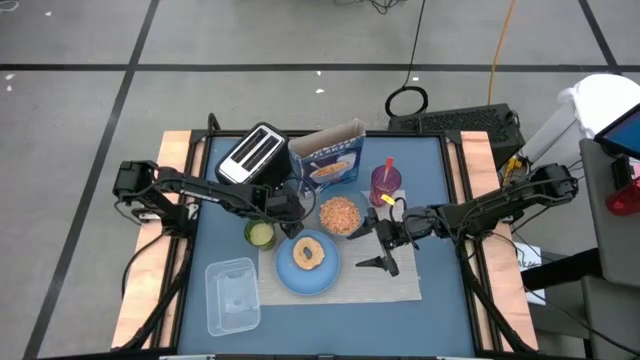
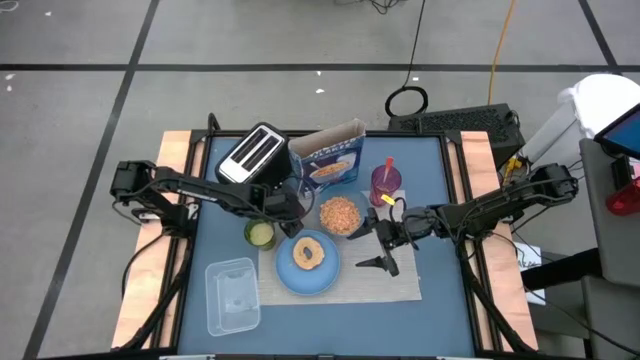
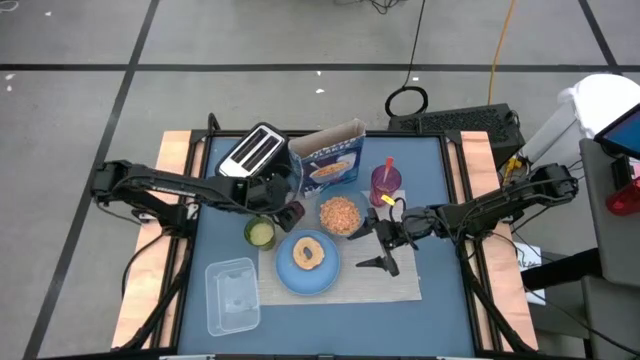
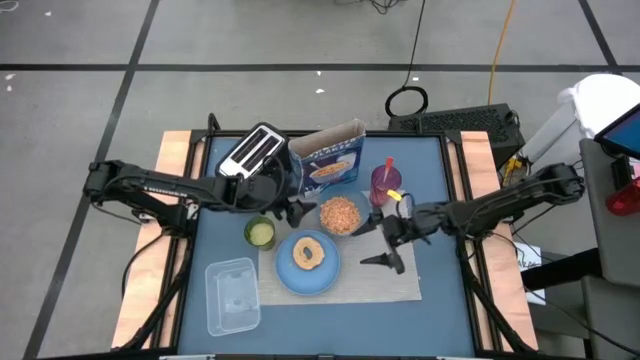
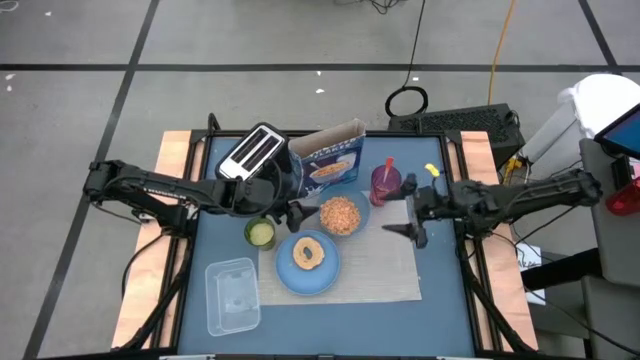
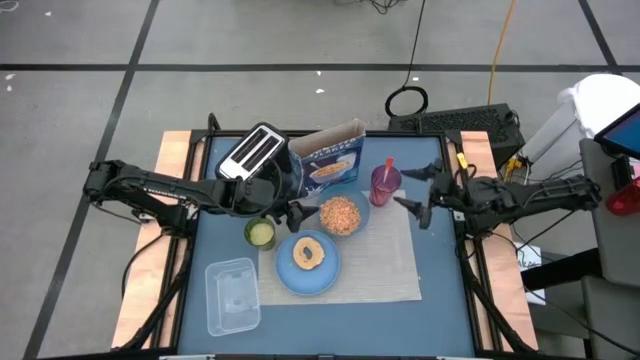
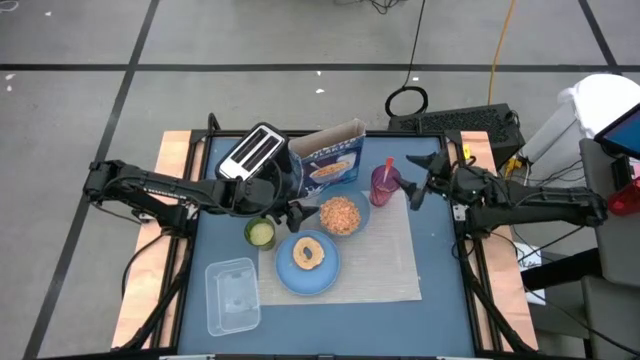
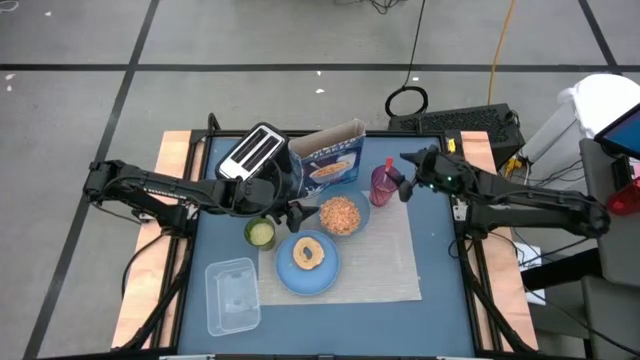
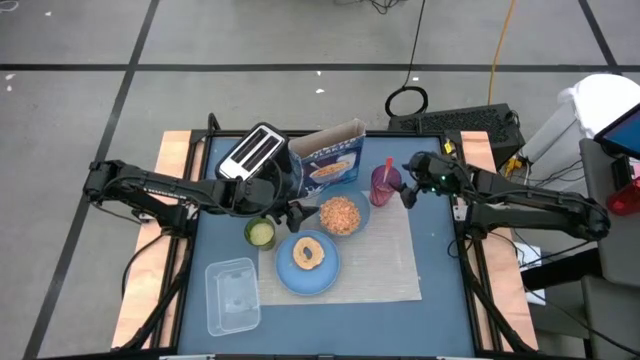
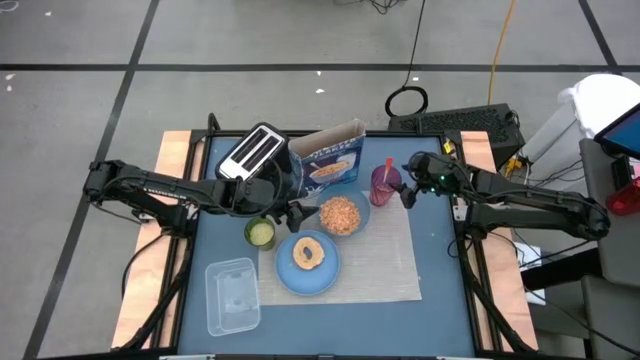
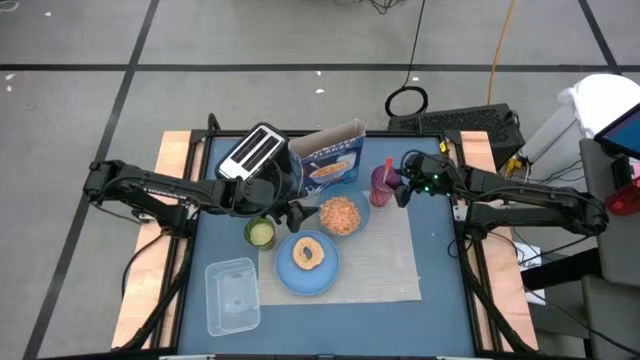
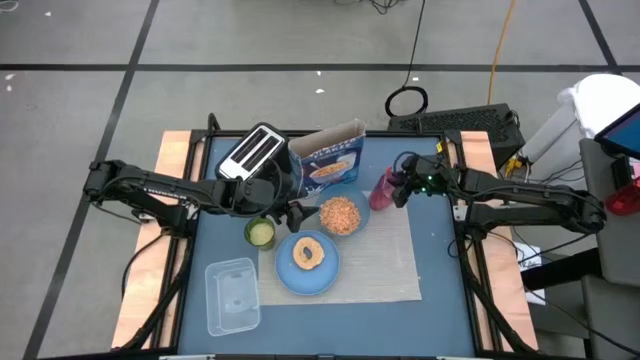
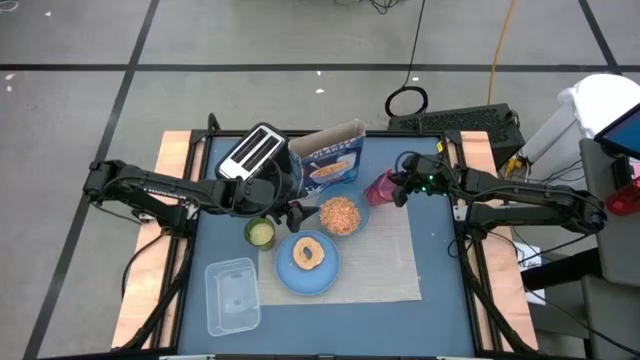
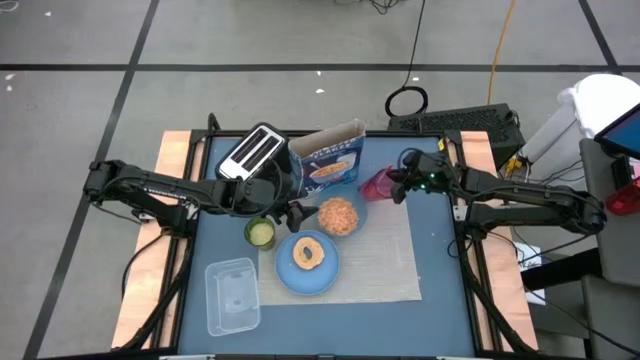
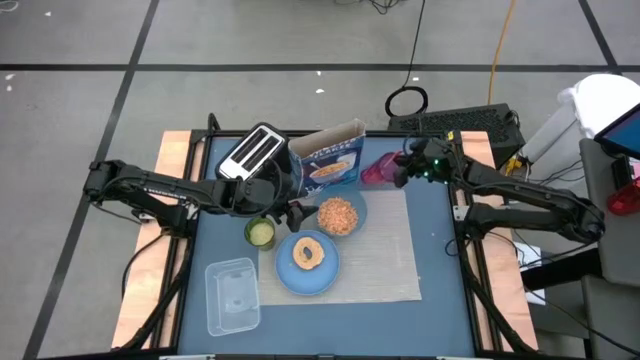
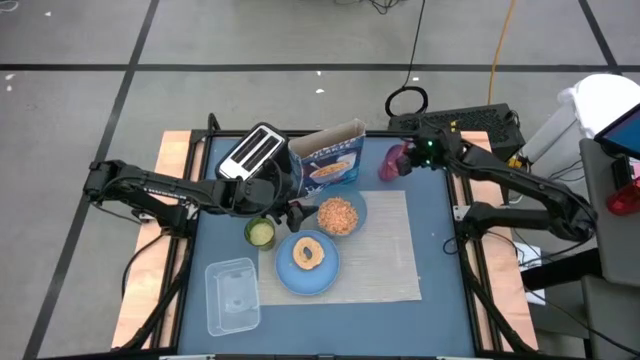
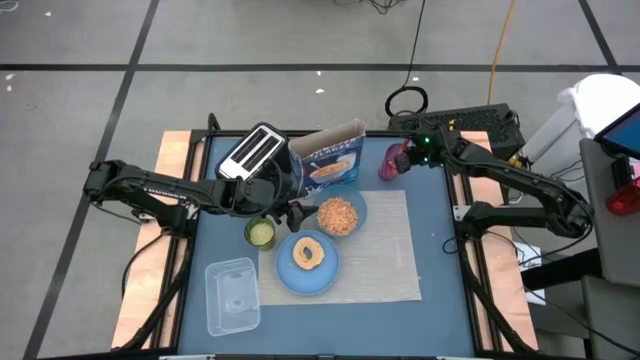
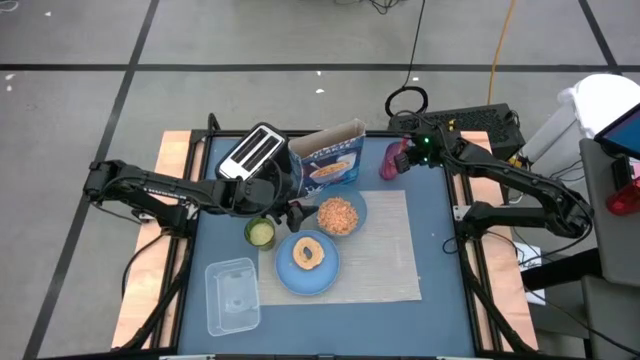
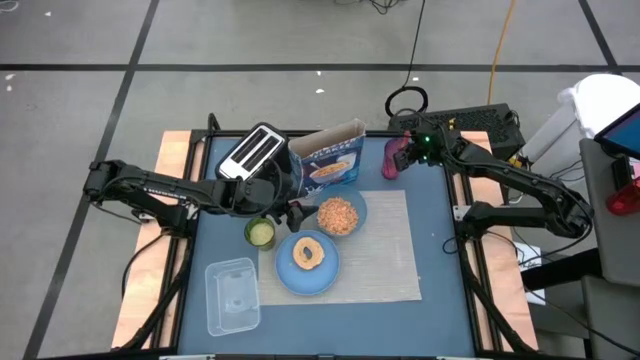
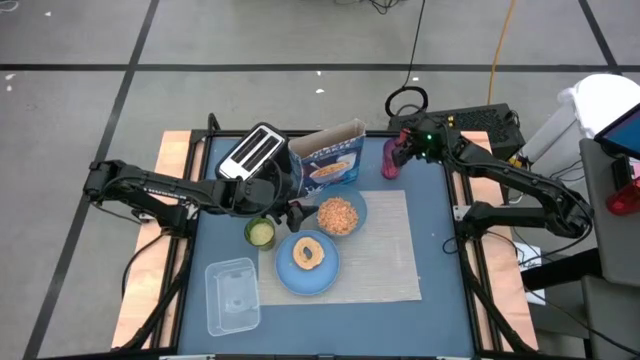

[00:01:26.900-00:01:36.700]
Task: Arrange a breakfast setting
Move the red cup to the top right of the table

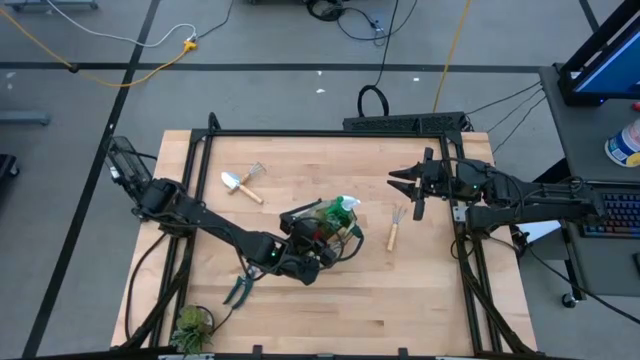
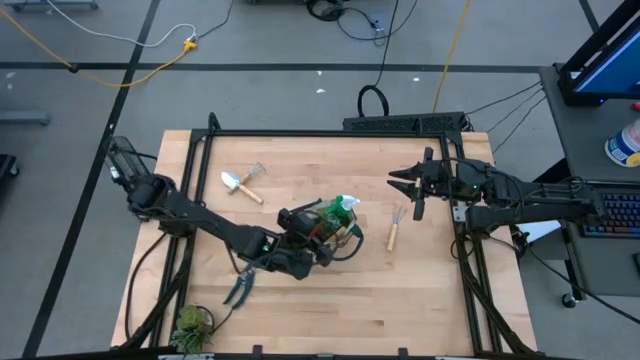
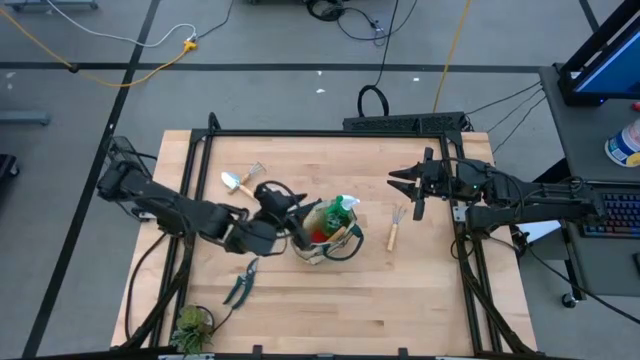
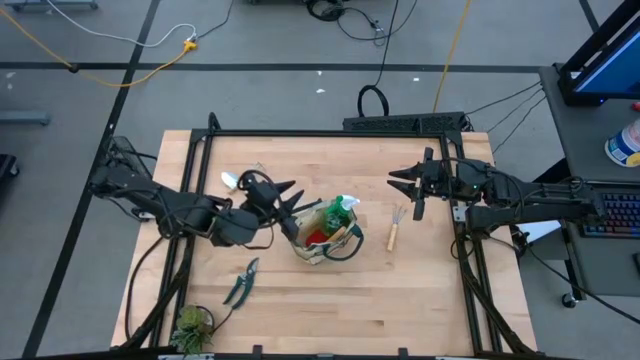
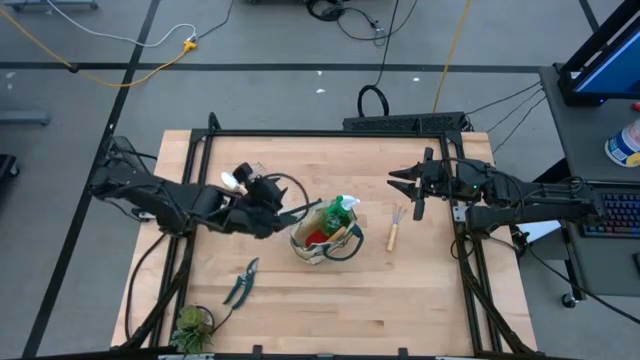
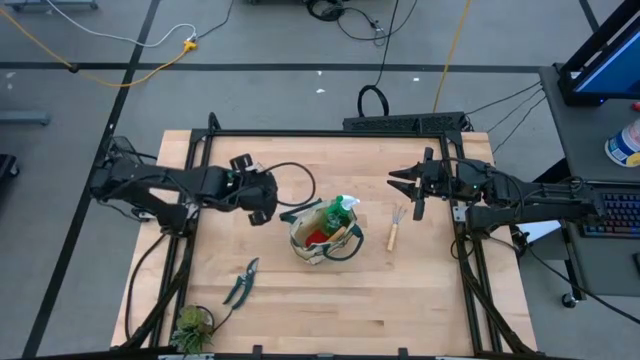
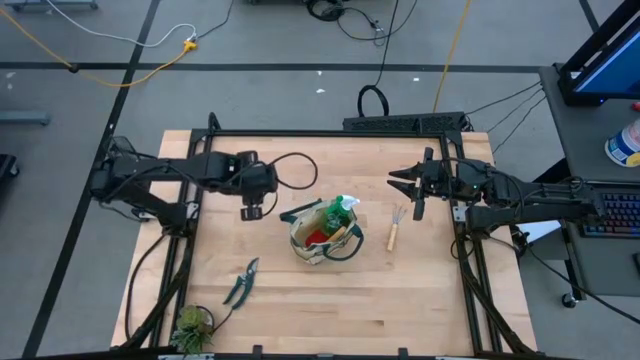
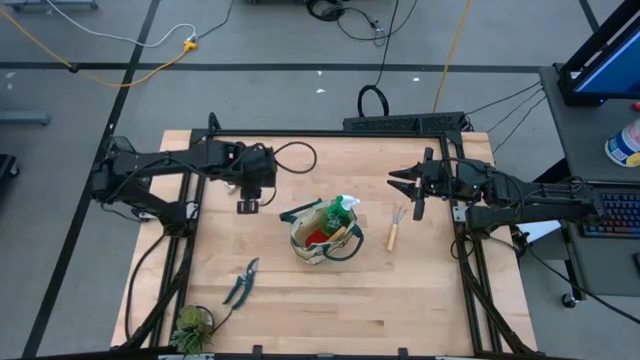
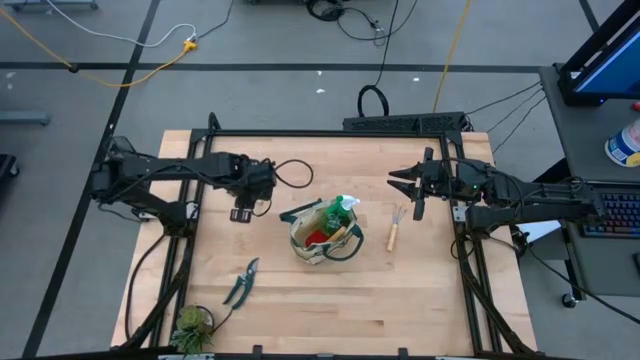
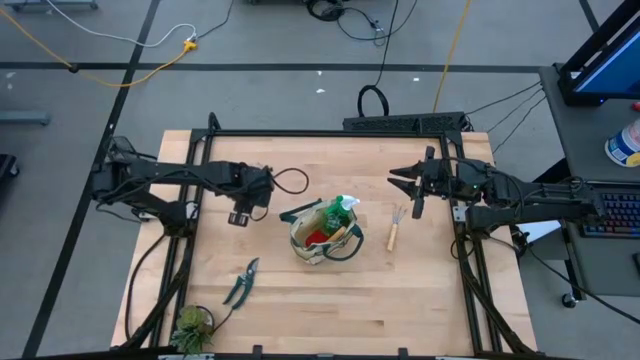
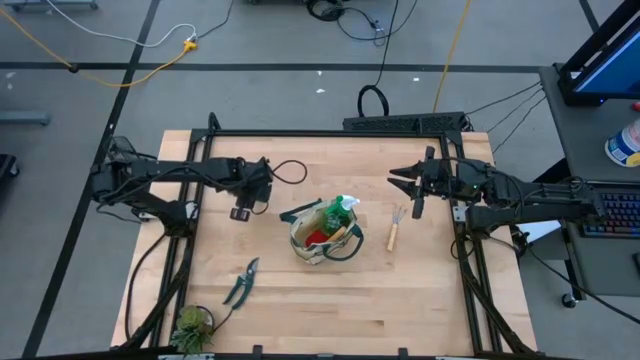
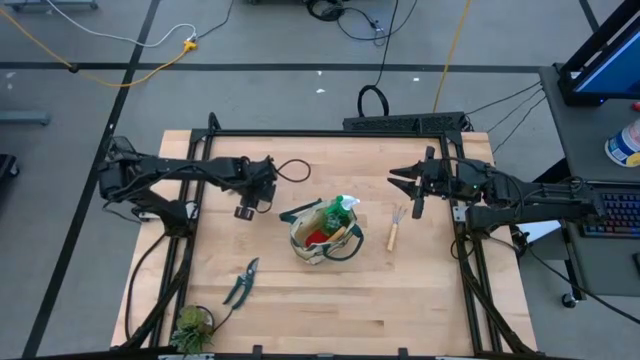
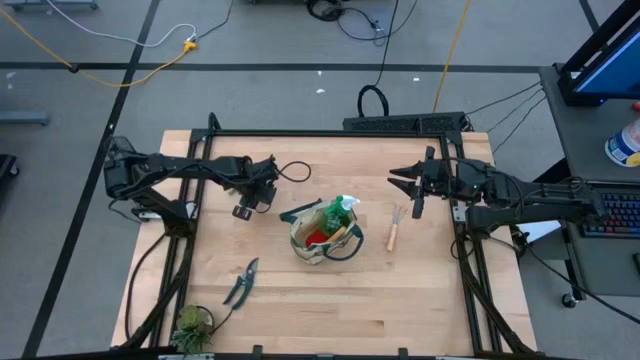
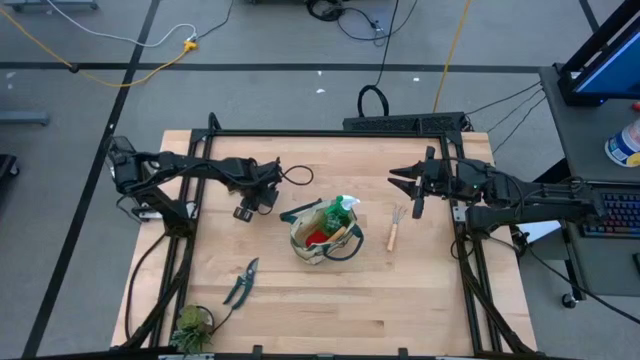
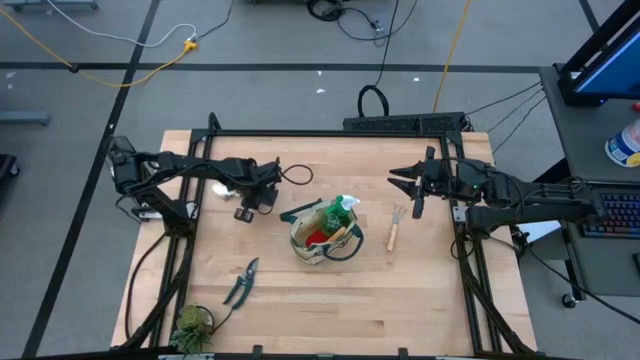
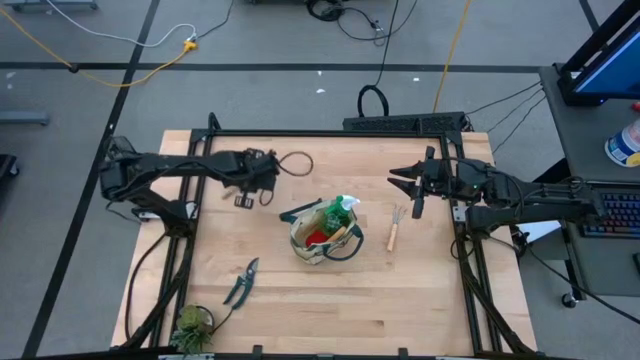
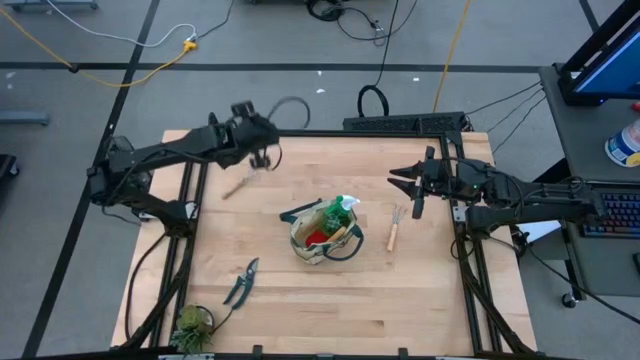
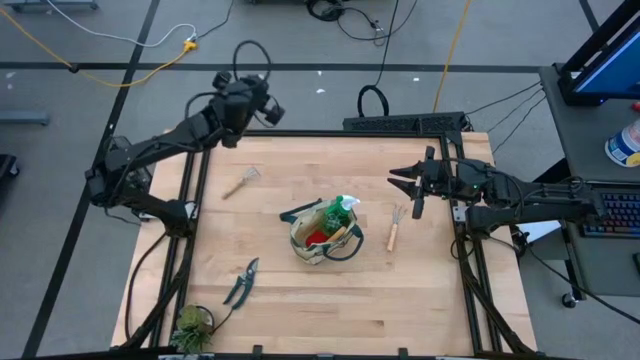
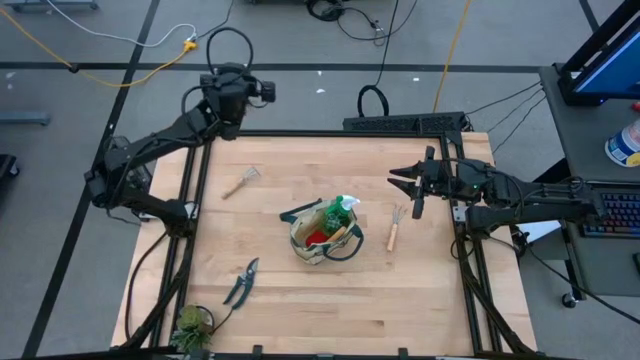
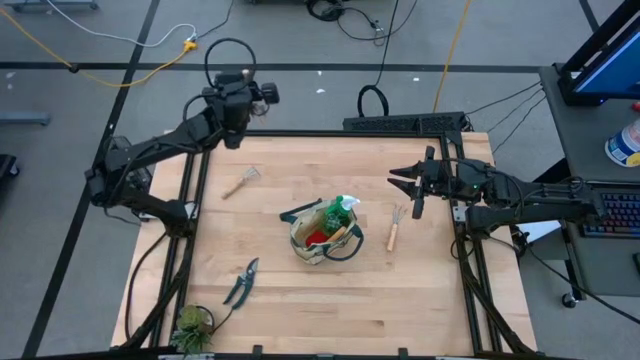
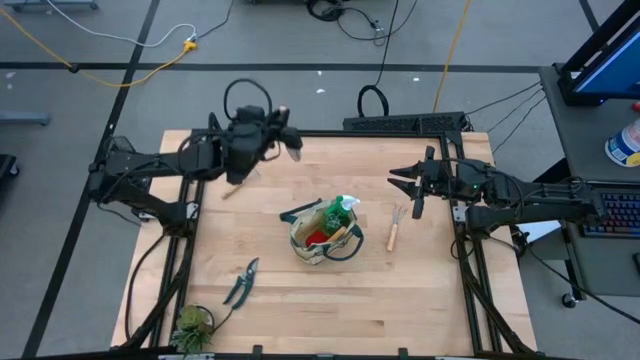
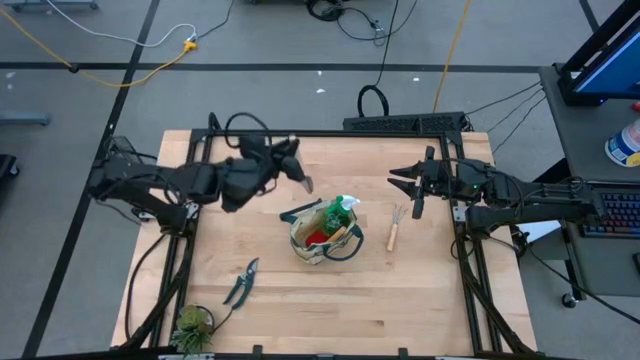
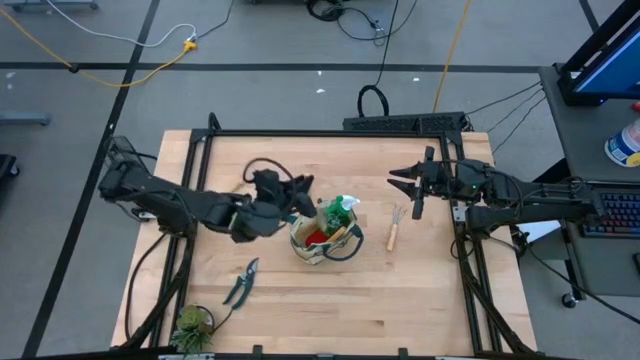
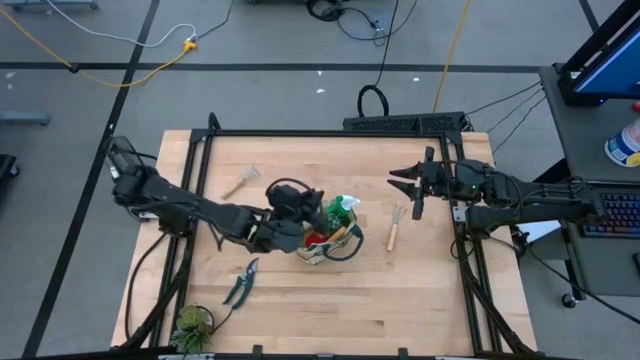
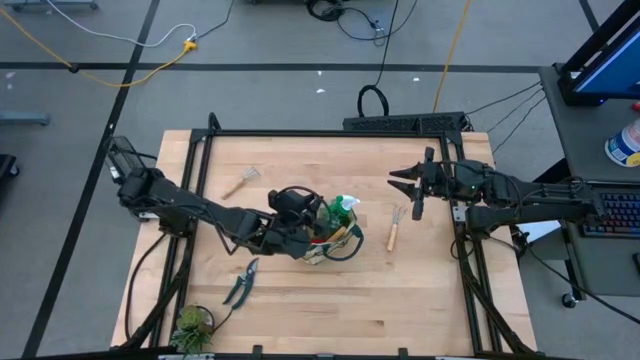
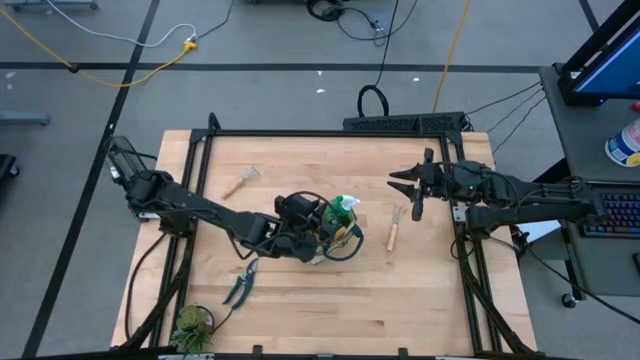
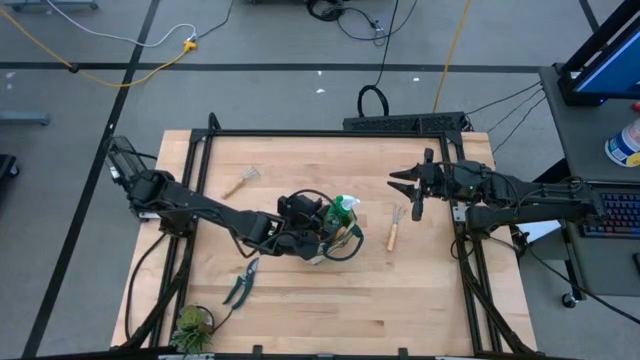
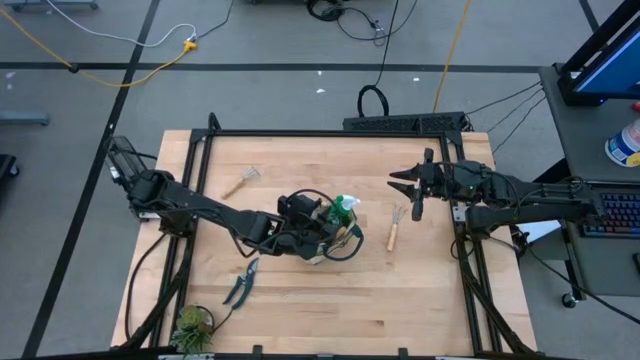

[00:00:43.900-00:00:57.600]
Task: Pick & Place Garden tools in Gardening bag
Put the trowel into the gardening bag
